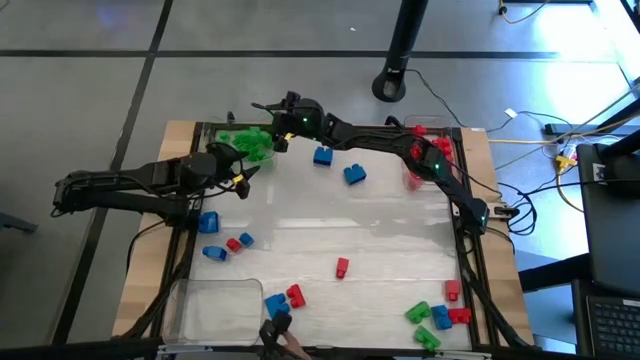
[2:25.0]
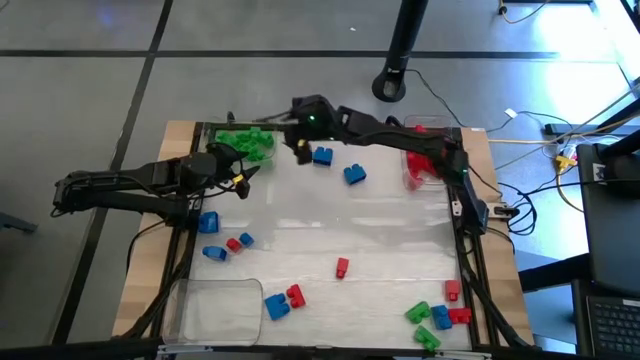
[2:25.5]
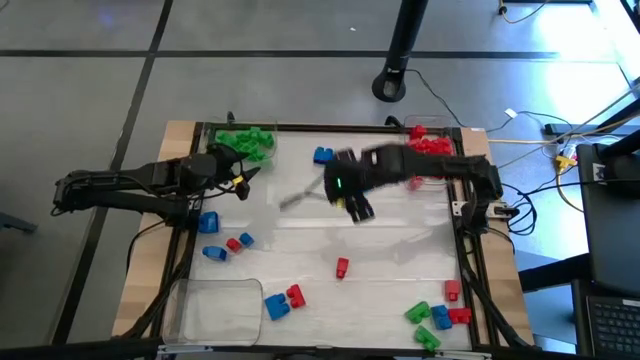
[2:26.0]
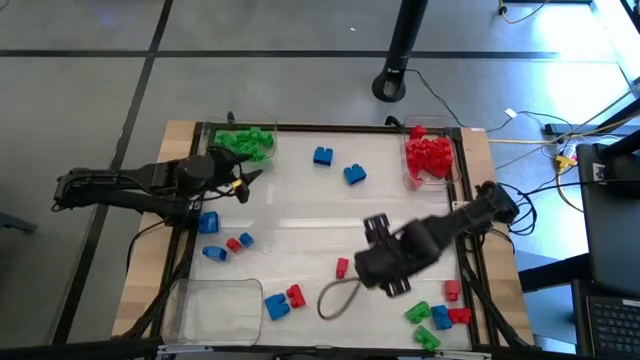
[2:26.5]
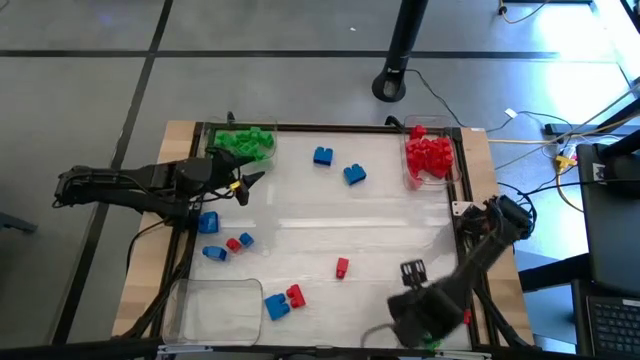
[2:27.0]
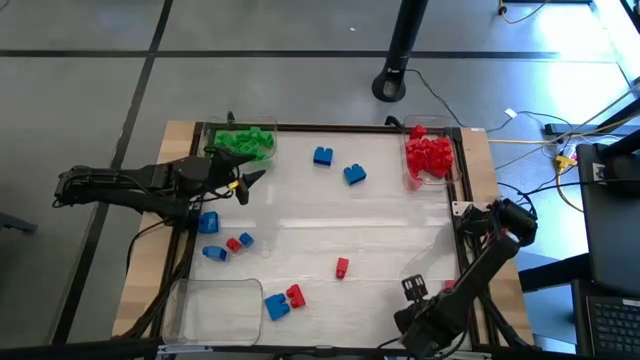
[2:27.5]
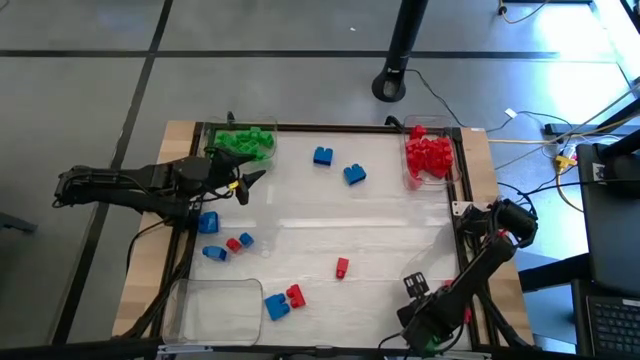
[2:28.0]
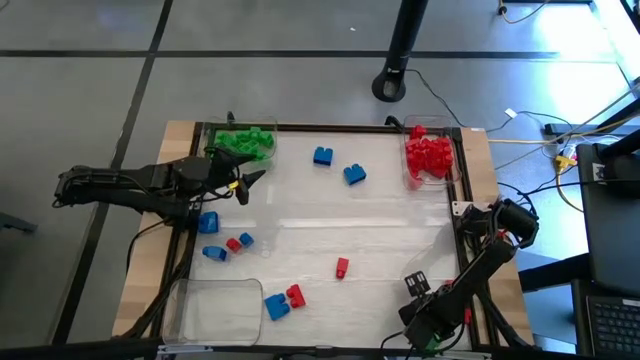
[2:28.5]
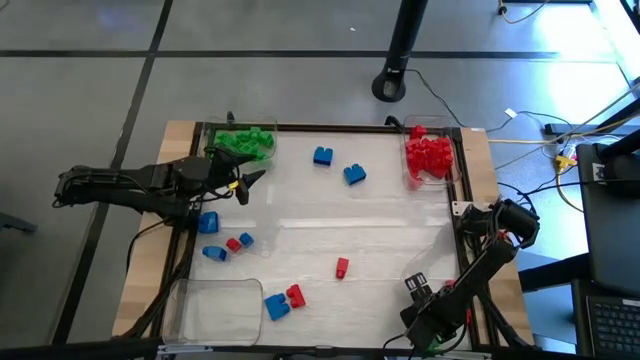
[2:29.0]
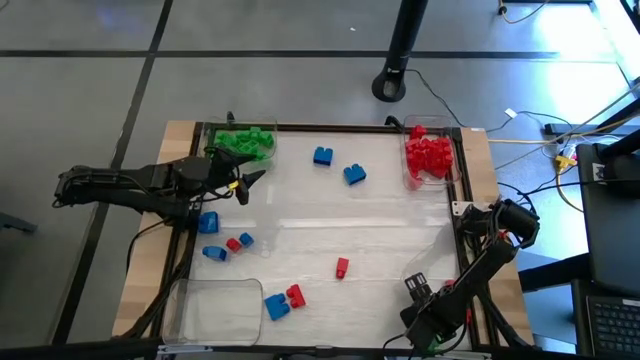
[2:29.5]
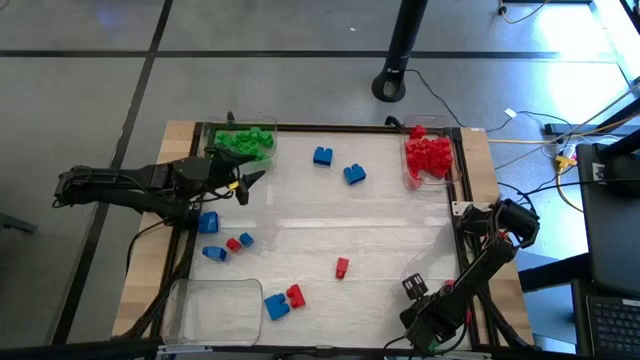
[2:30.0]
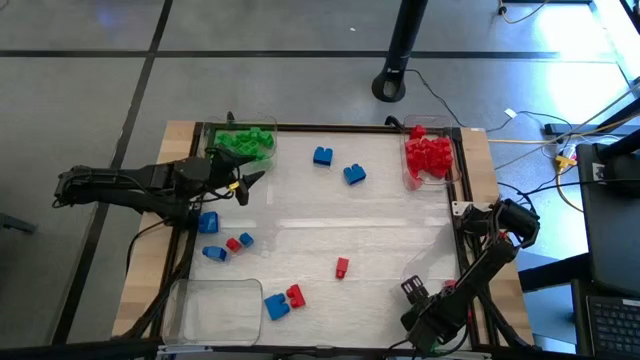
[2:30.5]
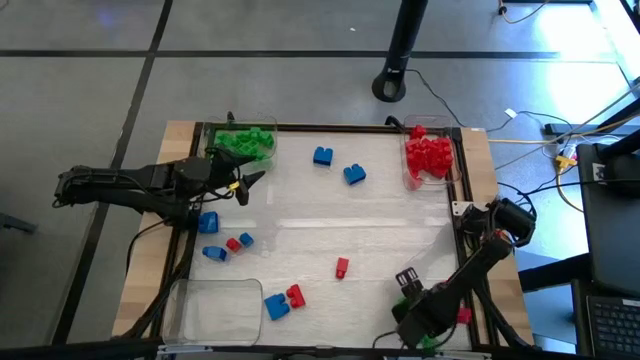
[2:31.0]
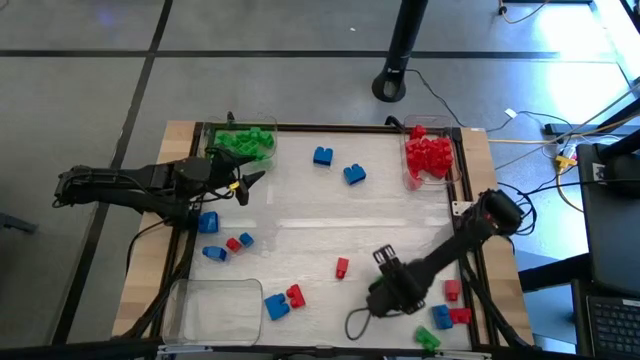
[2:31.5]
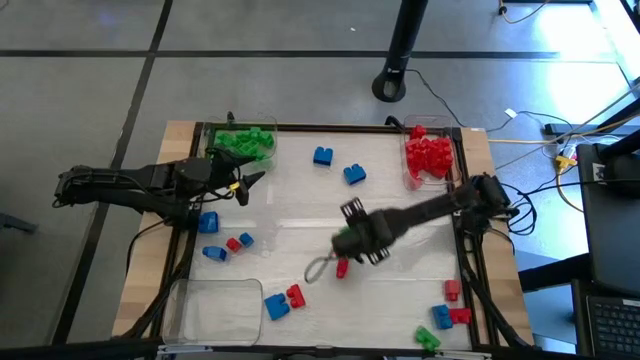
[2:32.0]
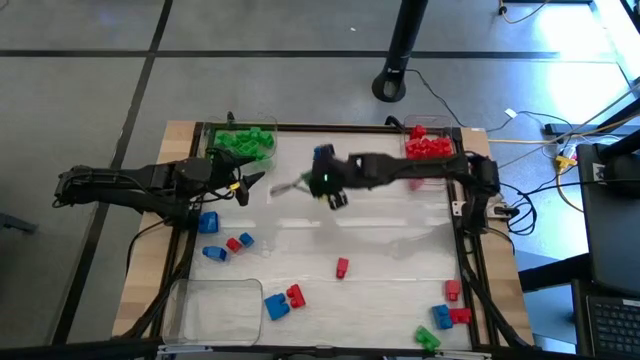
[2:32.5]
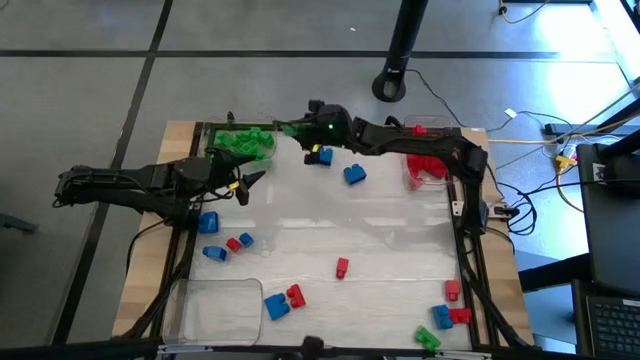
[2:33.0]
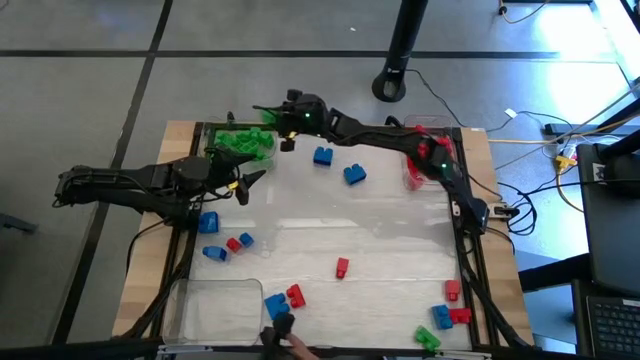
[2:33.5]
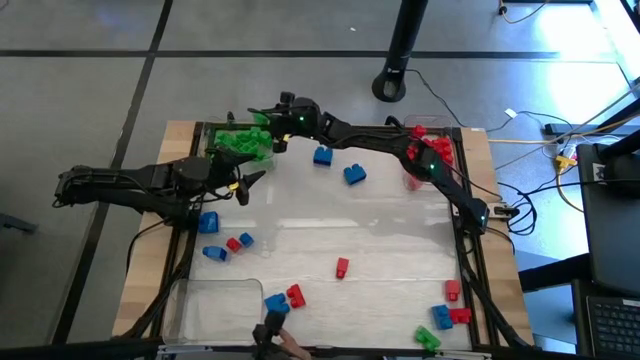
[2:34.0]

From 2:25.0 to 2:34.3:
Task: Sort blocks
Put the green game piece into the left transparent bin

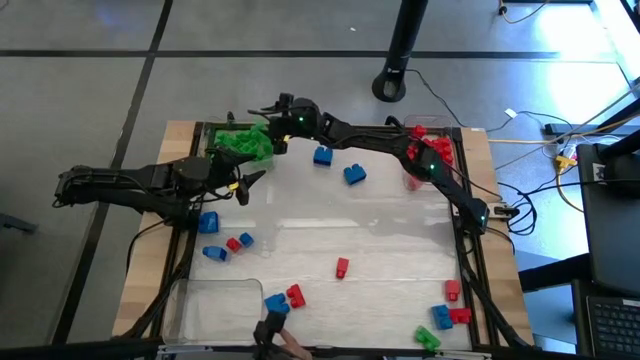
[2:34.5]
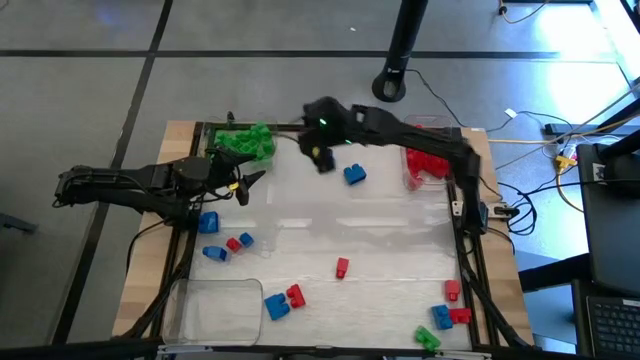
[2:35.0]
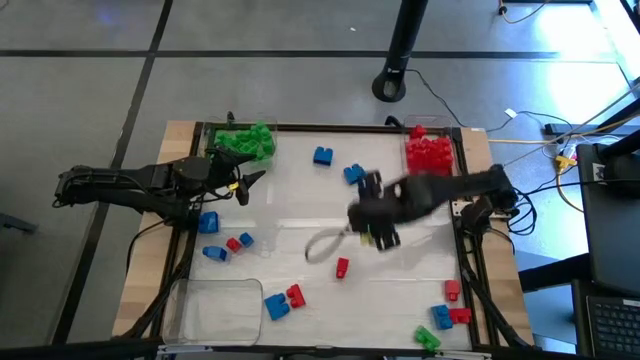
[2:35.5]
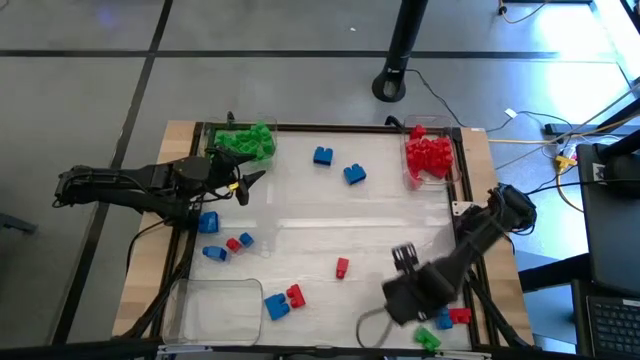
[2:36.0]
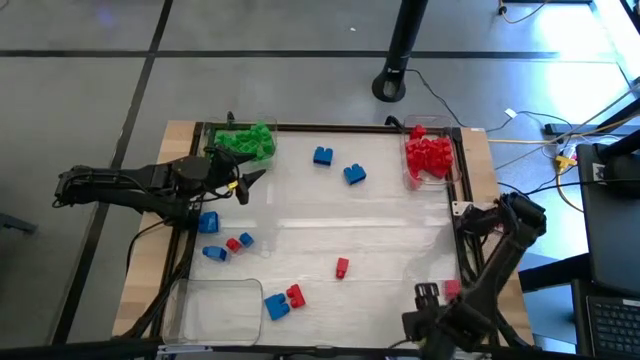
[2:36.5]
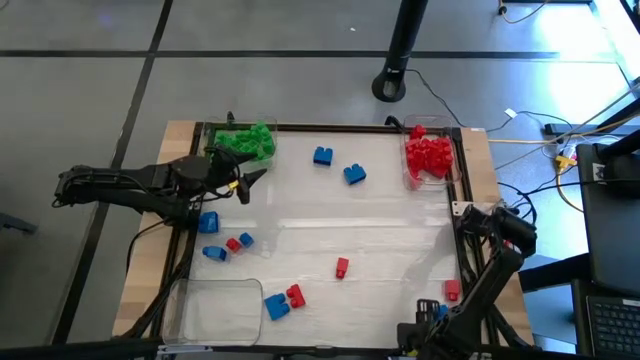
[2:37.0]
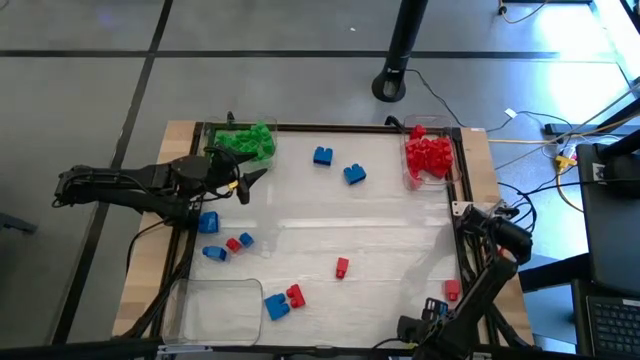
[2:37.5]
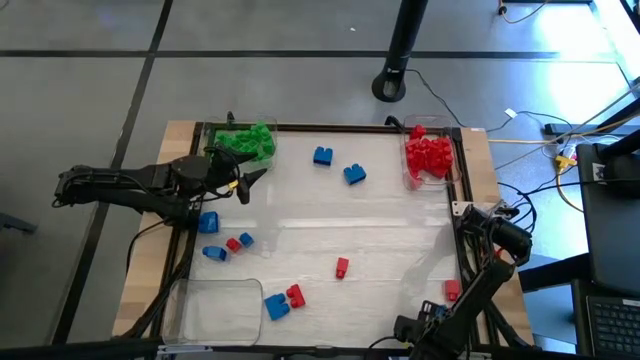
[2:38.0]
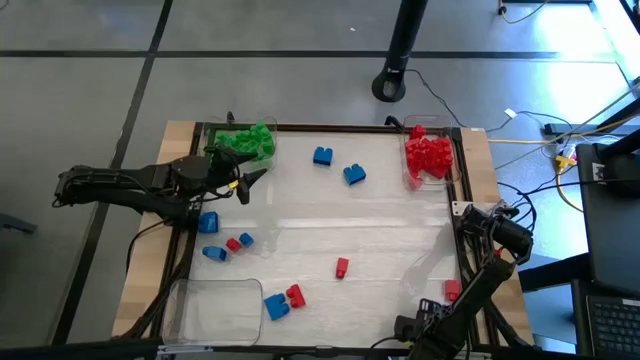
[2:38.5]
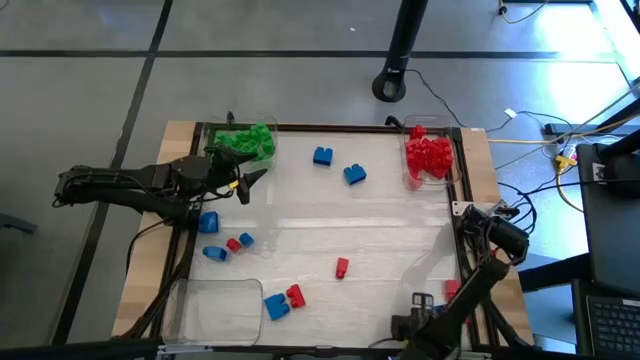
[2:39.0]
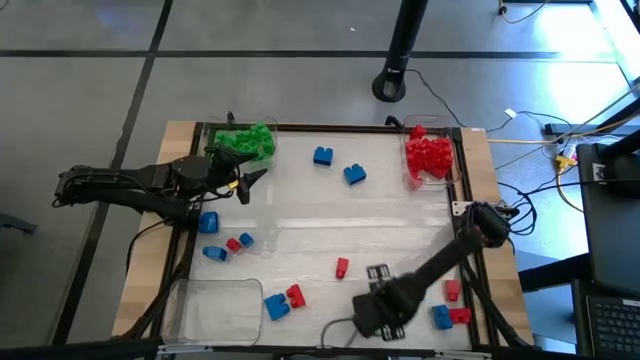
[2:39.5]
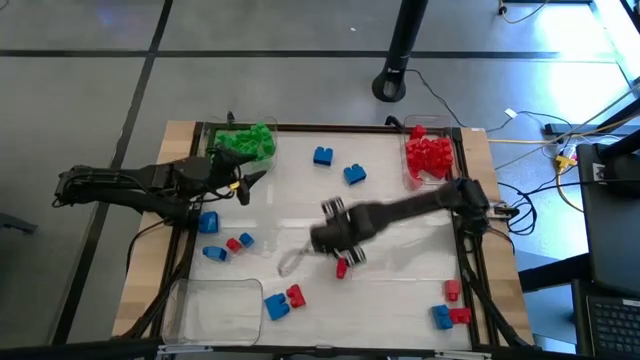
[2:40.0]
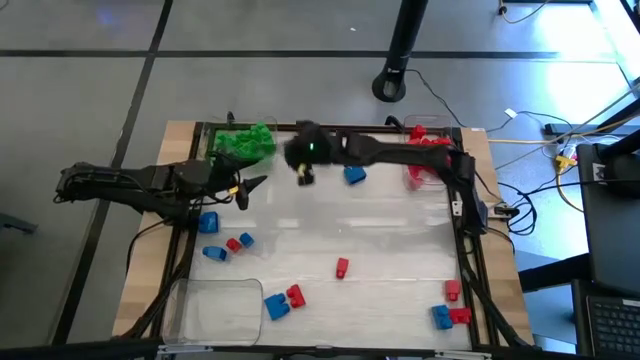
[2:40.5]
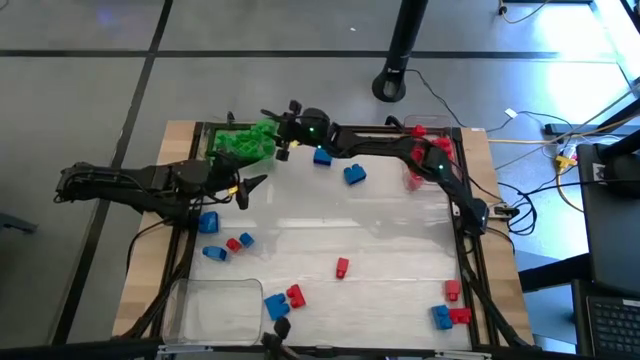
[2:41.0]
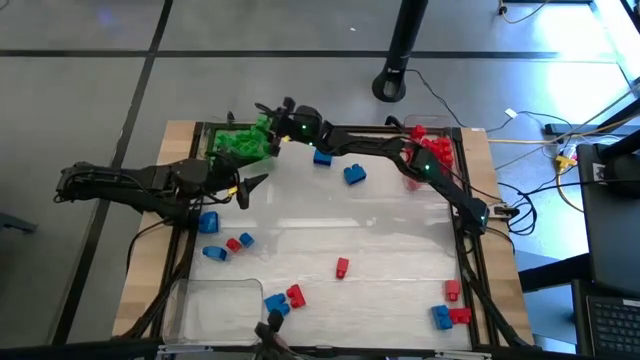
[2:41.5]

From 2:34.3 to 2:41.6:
Put the green game piece into the left transparent bin

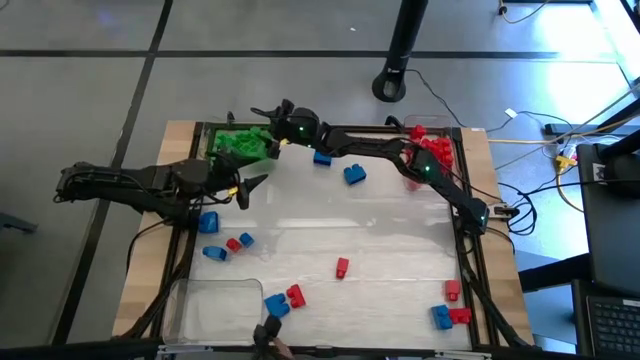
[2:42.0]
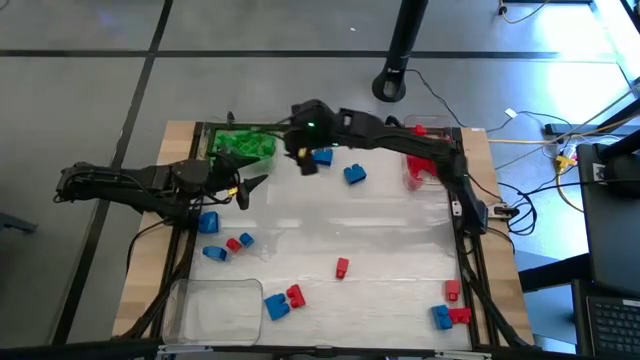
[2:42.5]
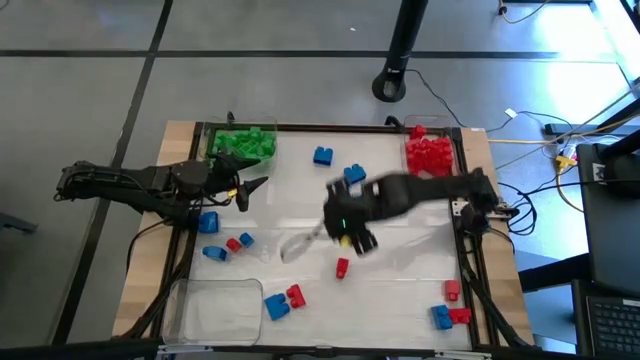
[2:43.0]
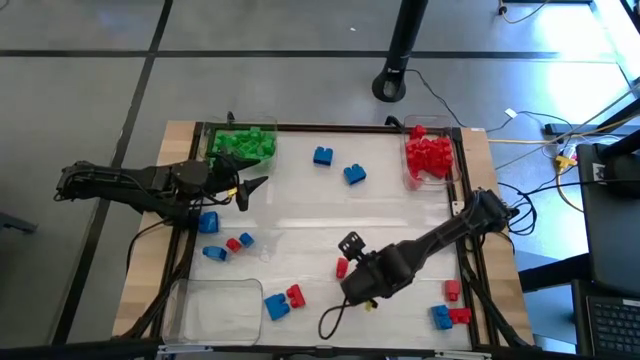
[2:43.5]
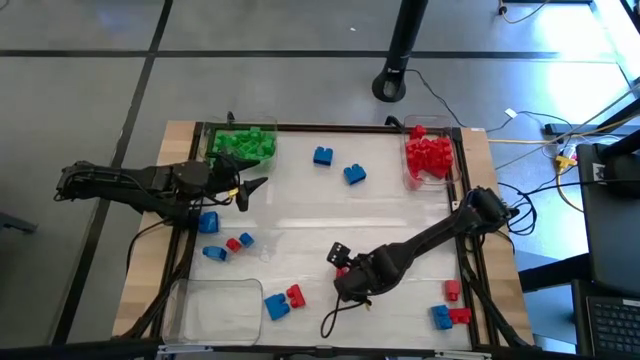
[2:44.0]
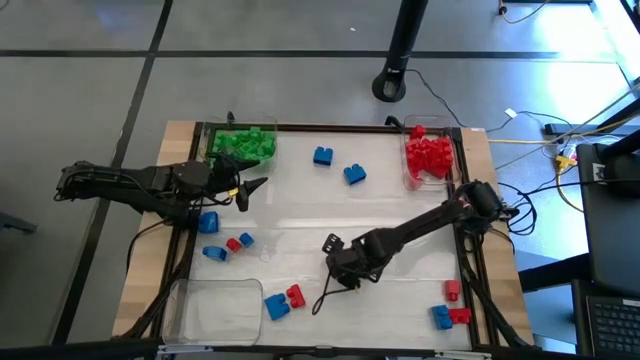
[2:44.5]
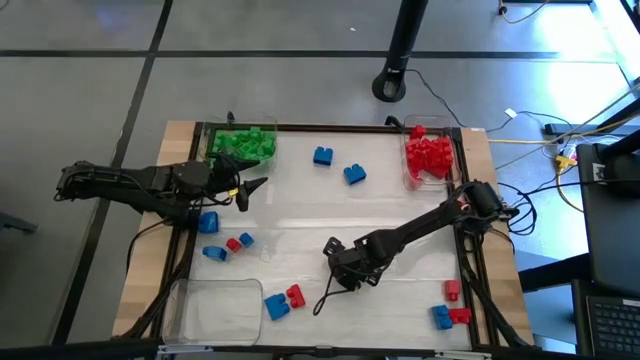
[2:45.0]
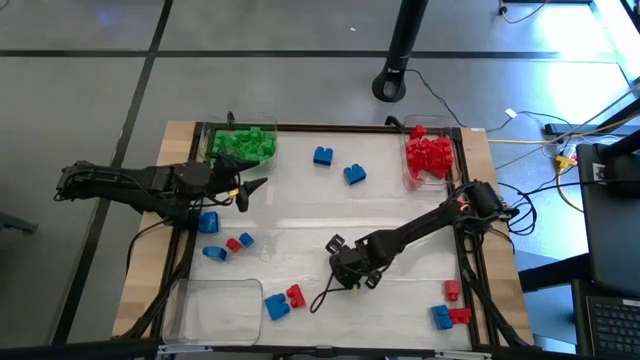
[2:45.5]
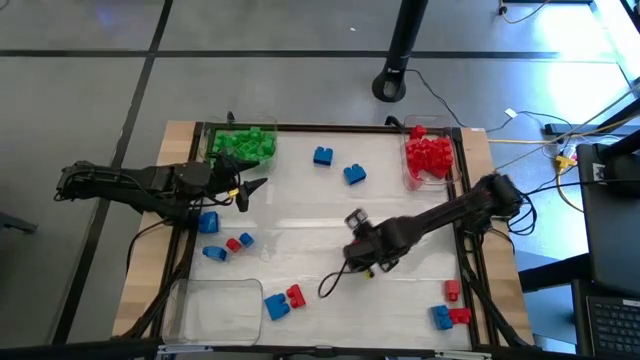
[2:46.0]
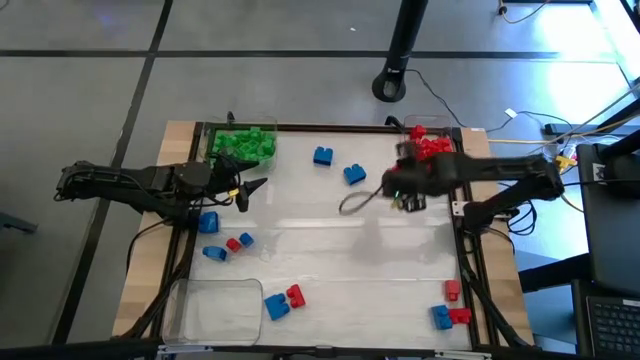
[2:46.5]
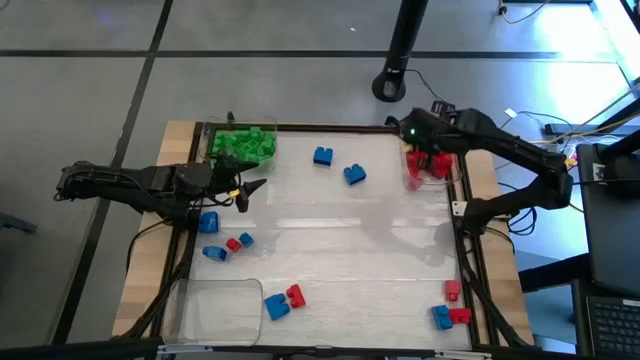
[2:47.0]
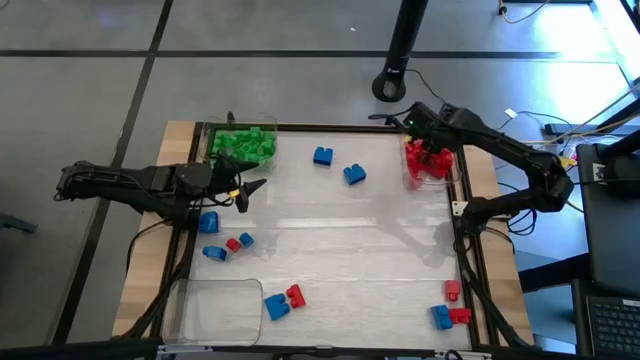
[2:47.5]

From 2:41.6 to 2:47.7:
Put the red game piece into the right transparent bin
